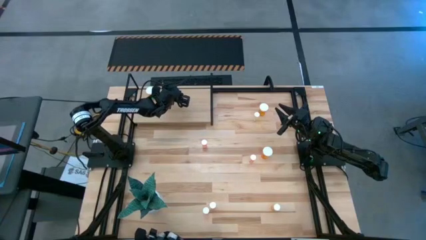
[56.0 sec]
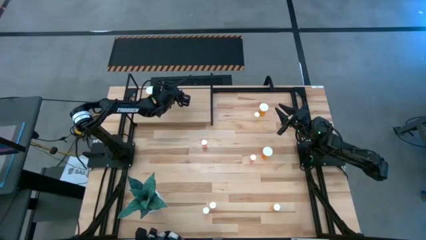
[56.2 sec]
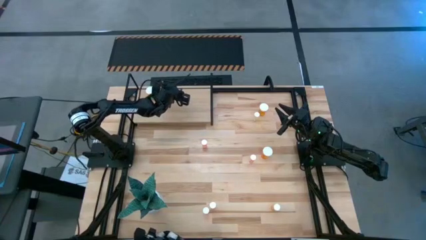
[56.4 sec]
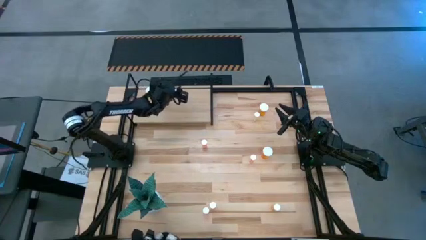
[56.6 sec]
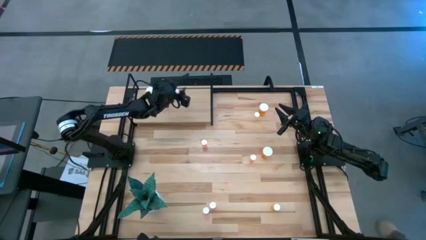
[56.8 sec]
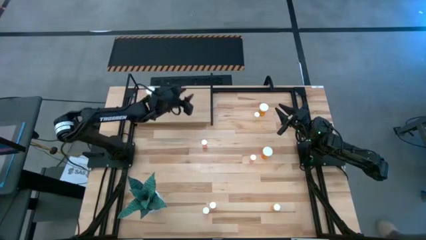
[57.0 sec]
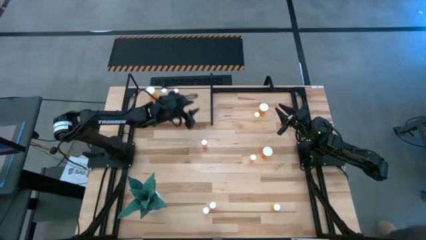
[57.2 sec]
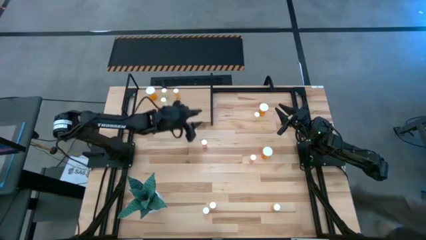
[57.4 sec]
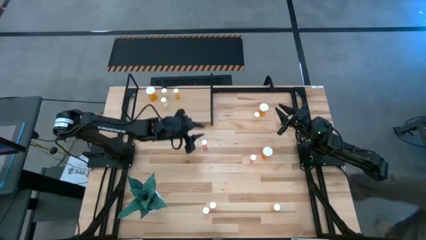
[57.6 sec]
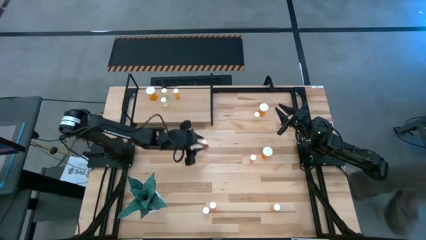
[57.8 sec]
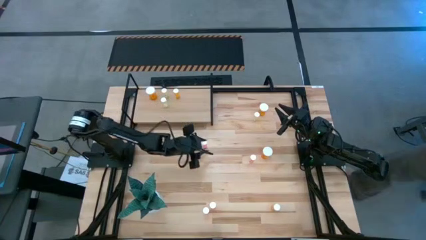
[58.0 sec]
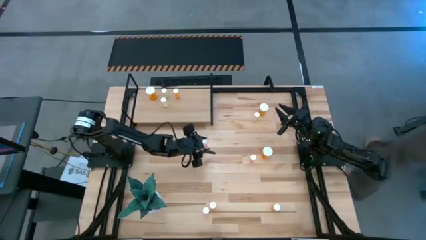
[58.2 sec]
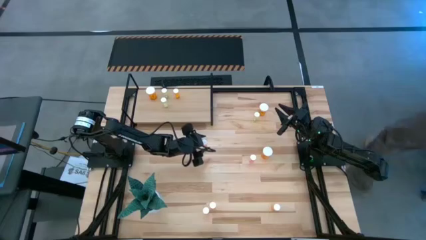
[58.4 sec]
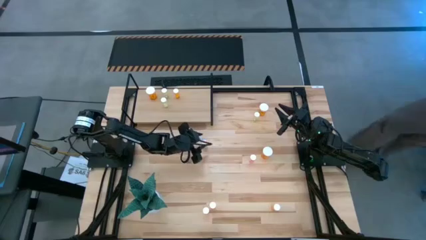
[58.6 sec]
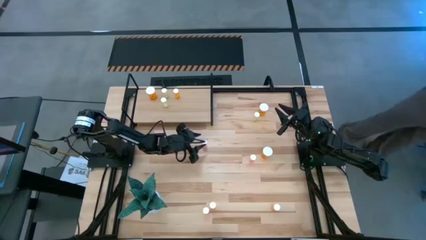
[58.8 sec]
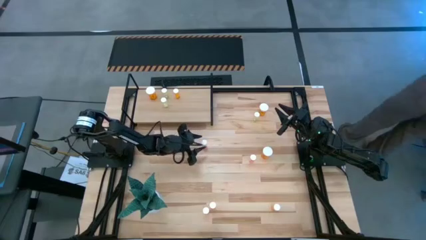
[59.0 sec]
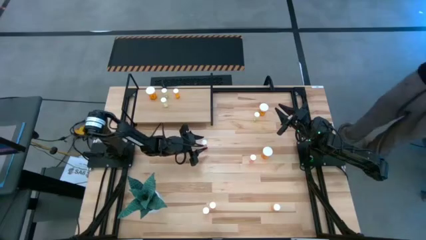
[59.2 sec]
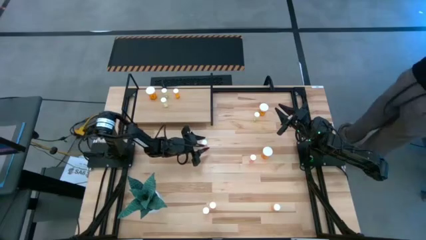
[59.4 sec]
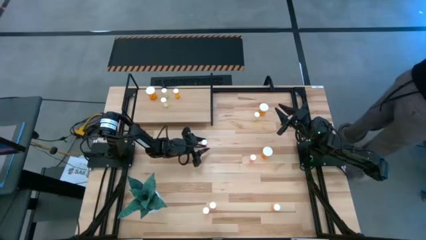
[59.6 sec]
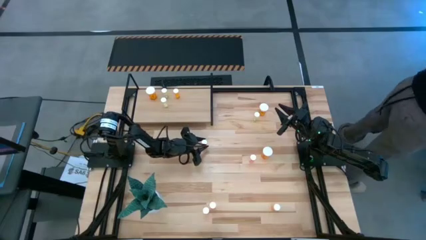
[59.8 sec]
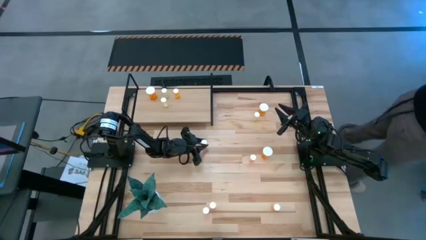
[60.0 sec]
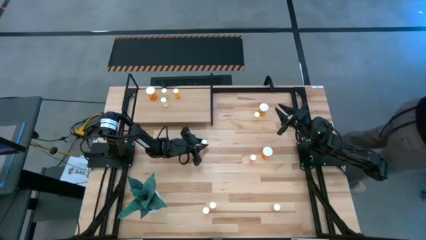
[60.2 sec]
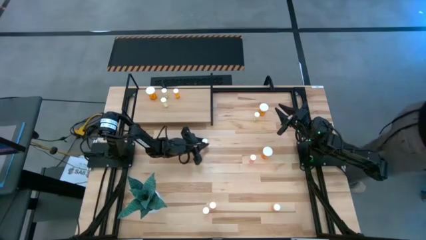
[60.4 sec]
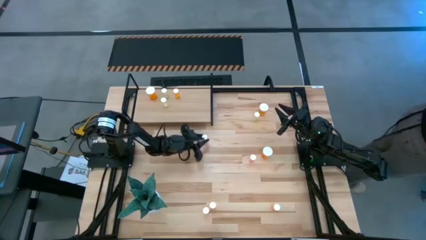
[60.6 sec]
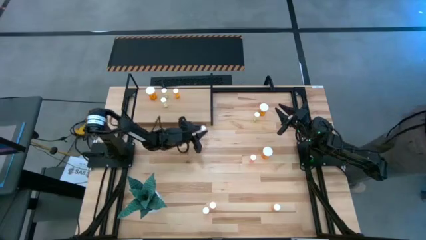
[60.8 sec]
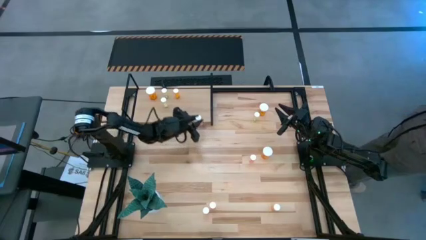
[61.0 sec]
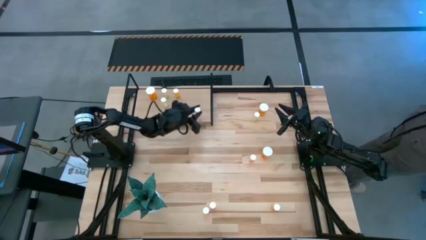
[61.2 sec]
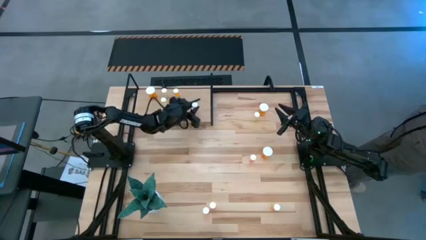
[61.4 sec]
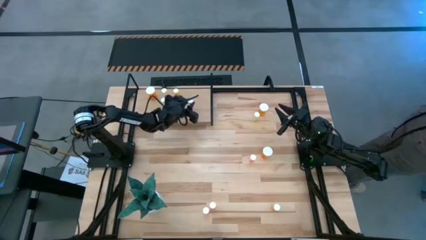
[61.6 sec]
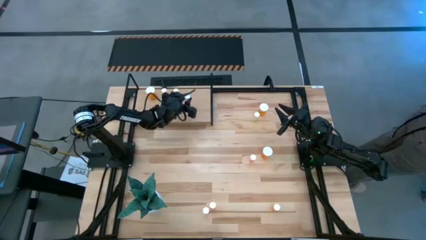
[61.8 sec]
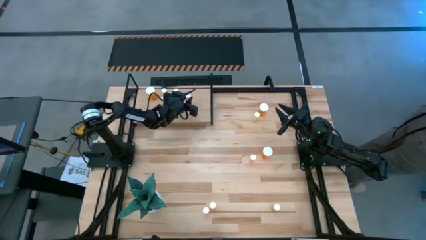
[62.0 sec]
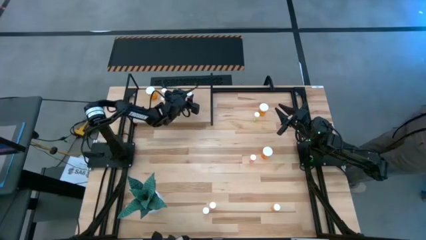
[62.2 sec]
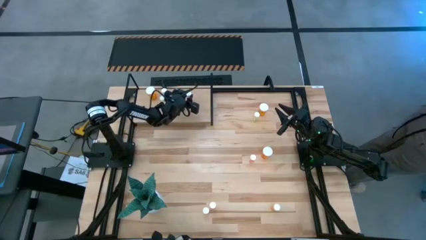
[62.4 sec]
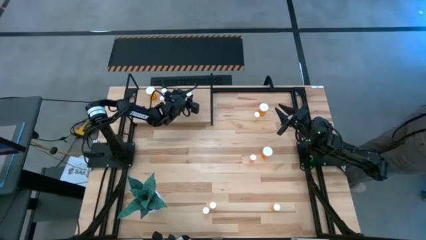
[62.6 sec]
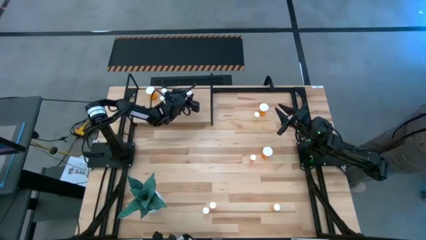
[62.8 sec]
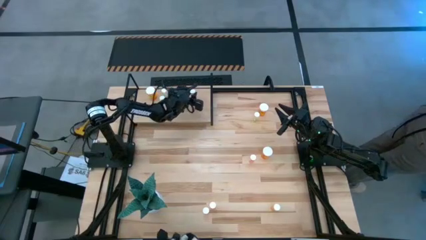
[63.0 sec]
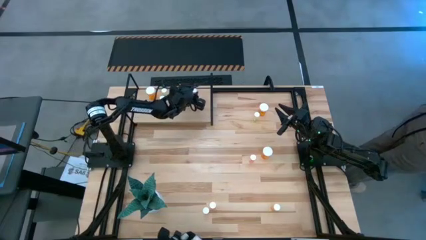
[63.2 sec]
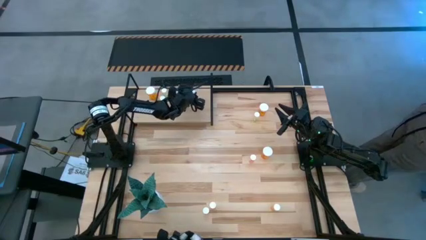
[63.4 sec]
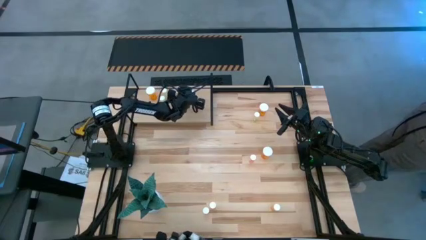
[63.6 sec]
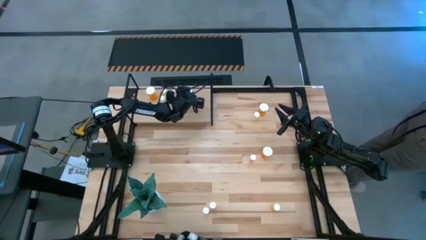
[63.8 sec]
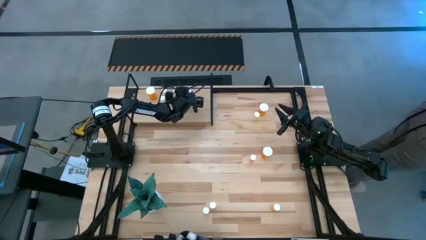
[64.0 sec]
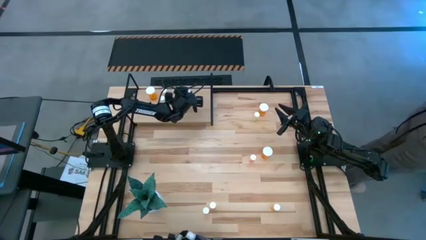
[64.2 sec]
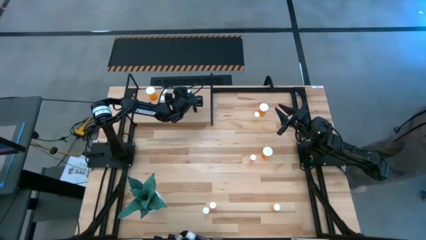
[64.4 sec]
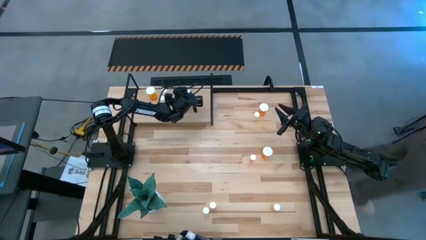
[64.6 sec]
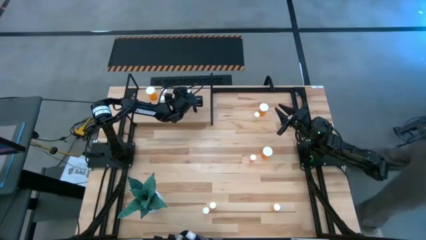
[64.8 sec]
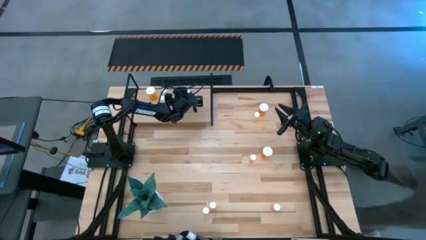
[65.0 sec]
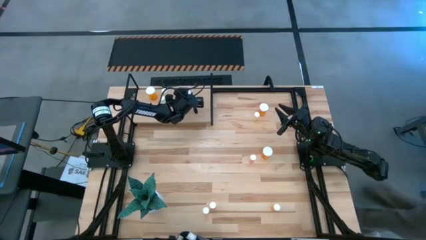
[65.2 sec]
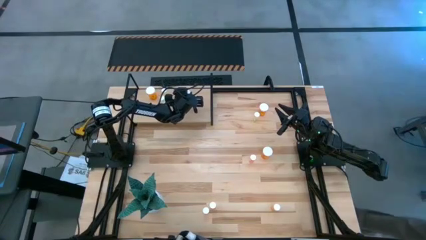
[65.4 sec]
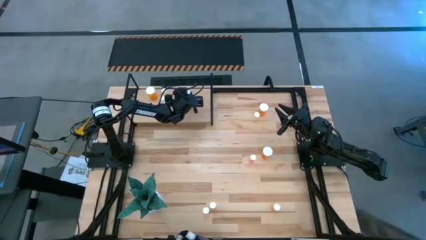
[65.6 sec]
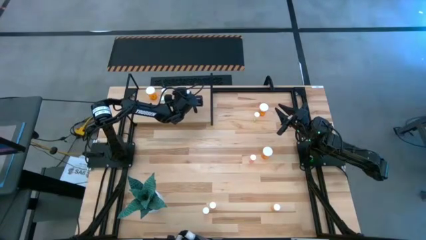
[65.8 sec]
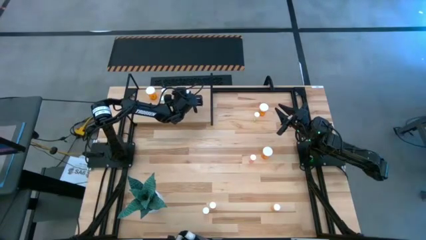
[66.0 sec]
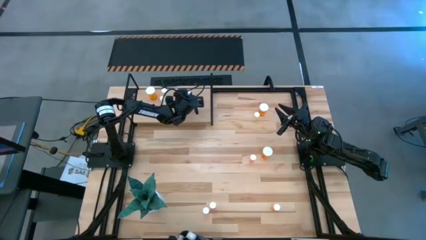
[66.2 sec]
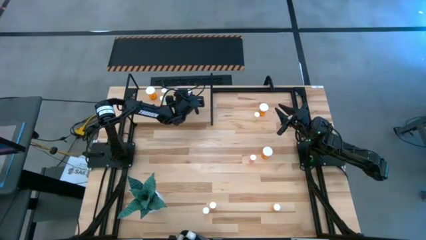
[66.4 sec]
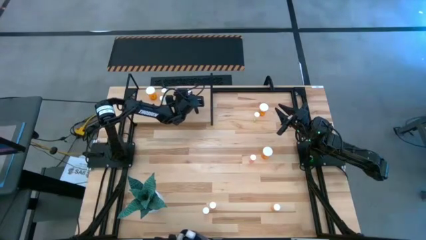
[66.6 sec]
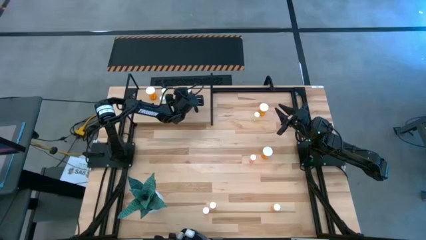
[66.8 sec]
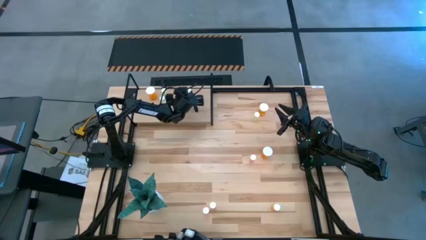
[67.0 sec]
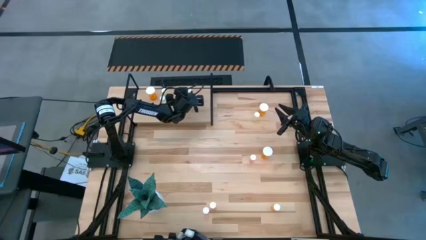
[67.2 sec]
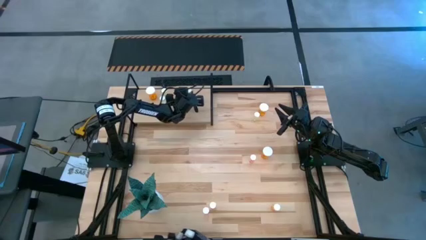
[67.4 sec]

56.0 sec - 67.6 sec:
Task: Pick and place medicine bottles onto shelf by color
Put the top left pink pill bottle on the shelf
